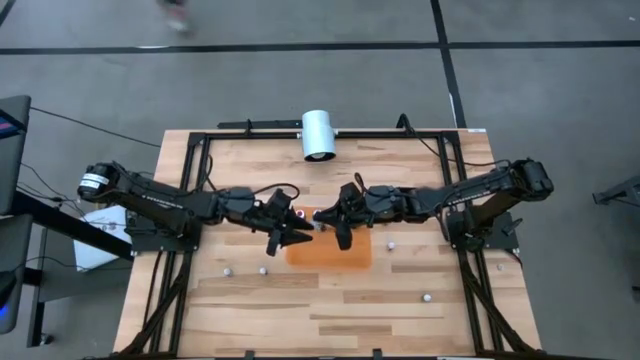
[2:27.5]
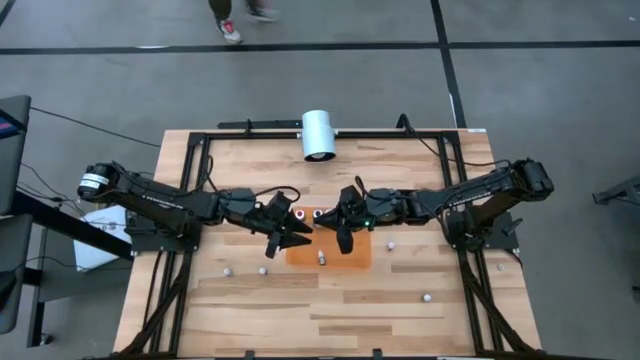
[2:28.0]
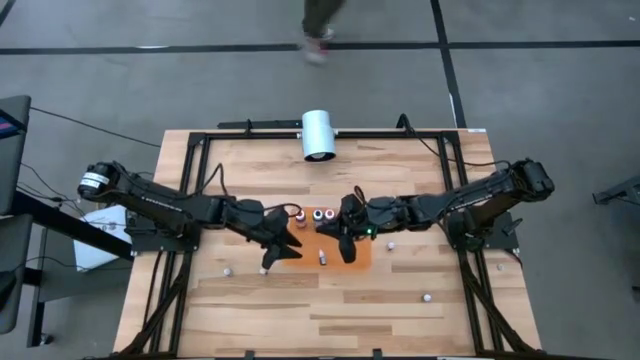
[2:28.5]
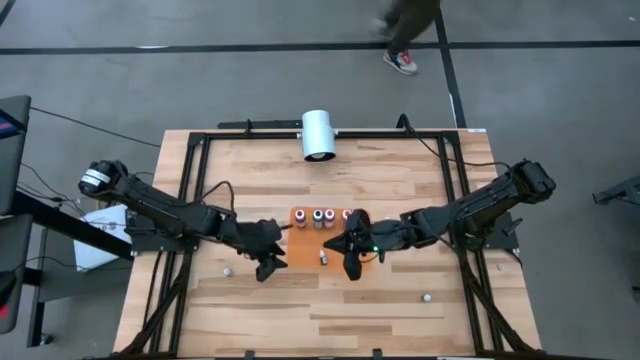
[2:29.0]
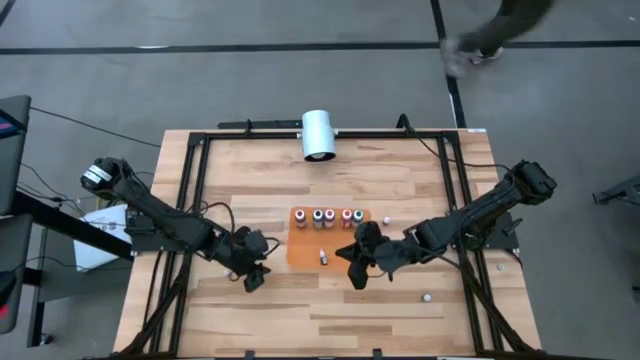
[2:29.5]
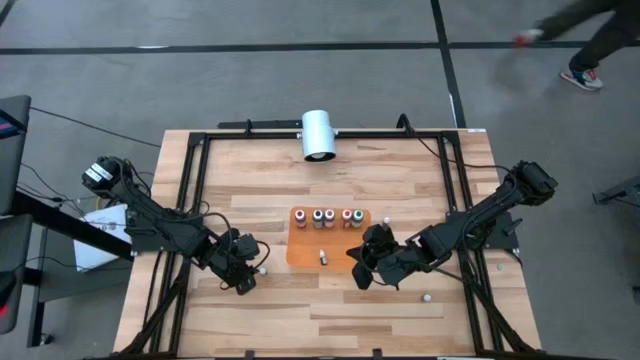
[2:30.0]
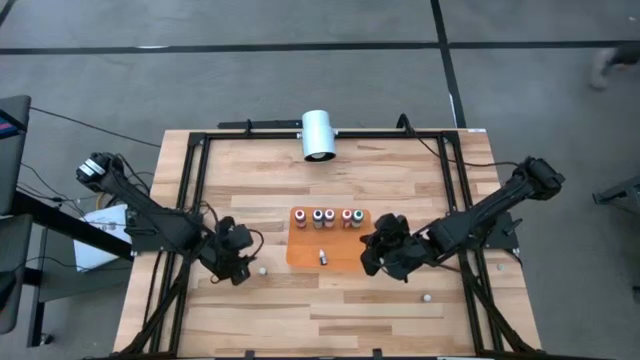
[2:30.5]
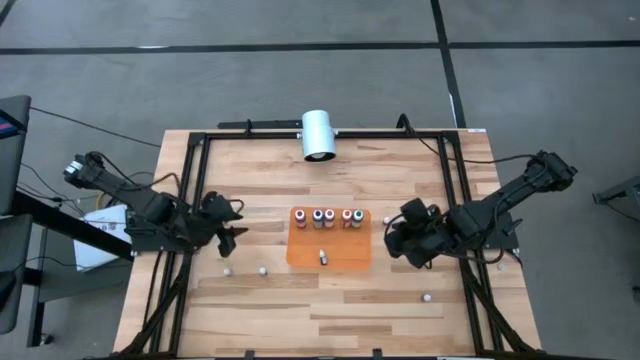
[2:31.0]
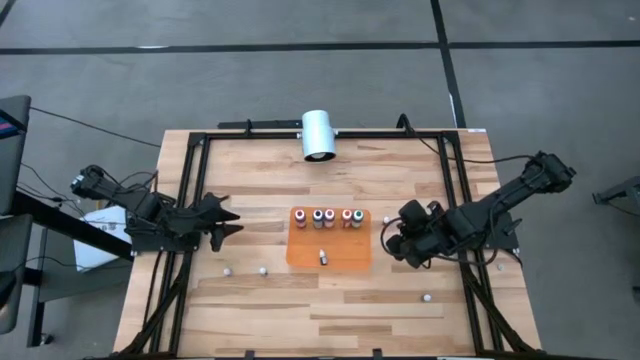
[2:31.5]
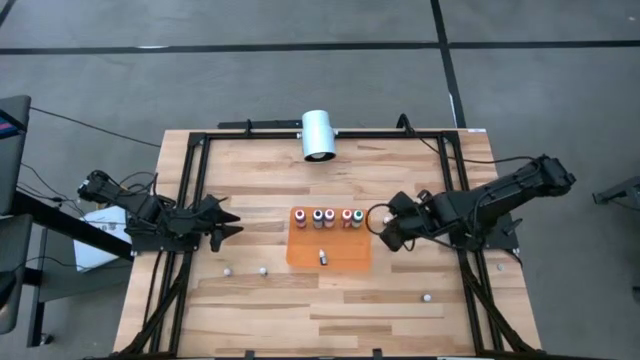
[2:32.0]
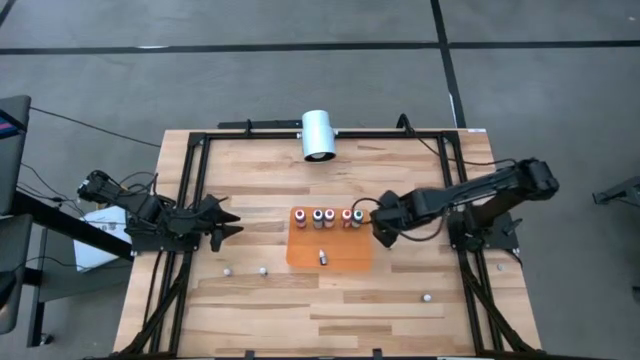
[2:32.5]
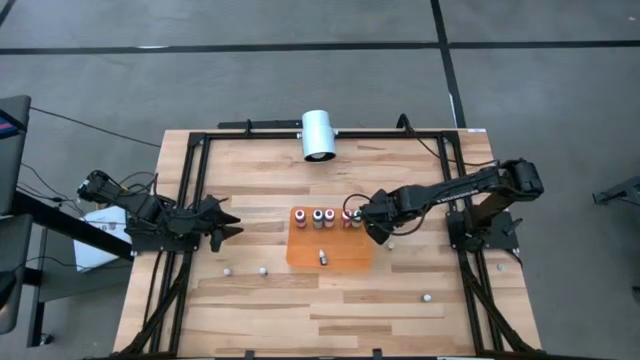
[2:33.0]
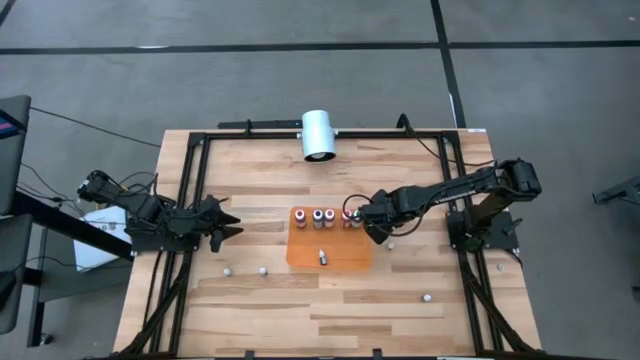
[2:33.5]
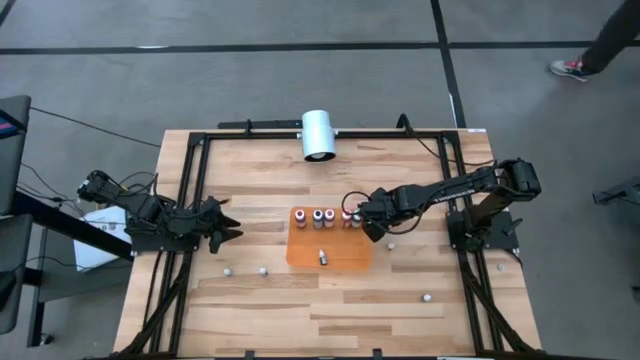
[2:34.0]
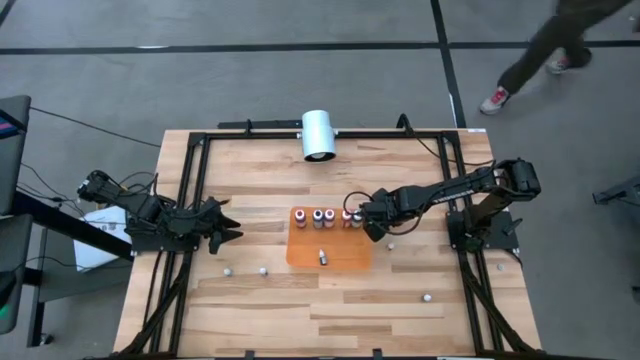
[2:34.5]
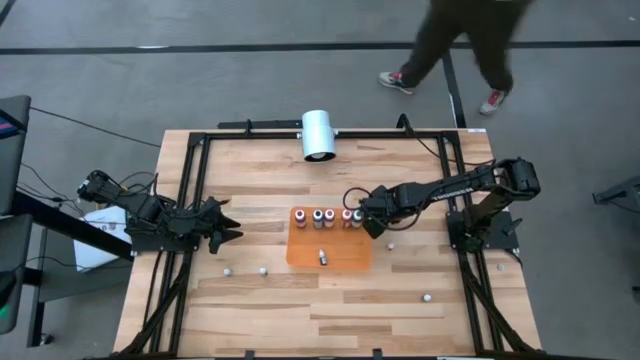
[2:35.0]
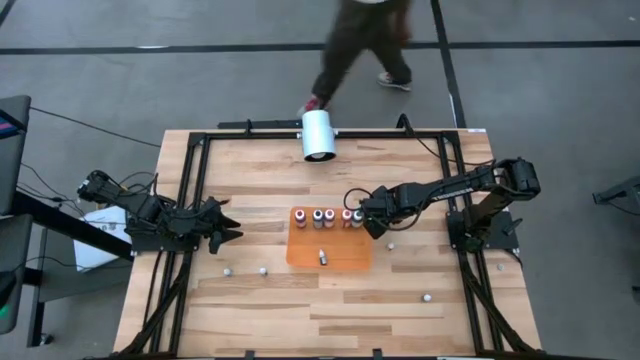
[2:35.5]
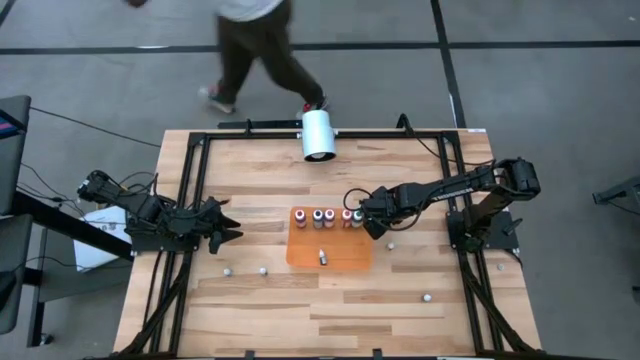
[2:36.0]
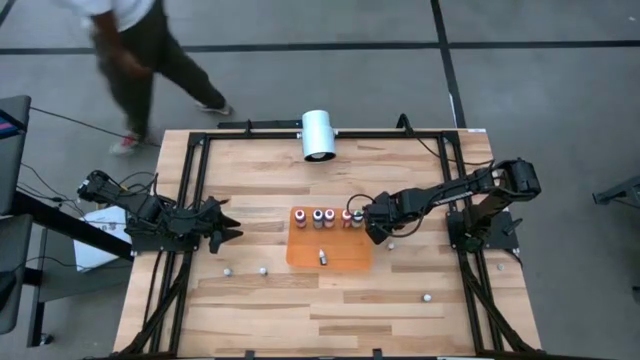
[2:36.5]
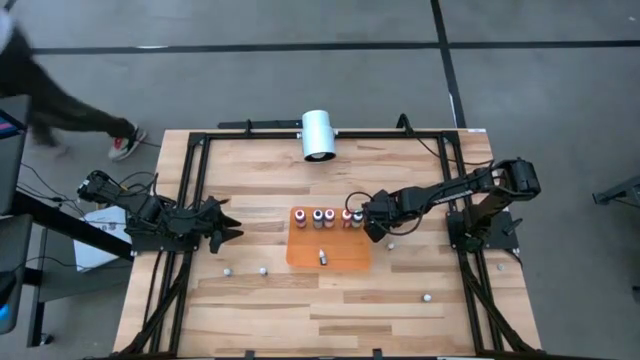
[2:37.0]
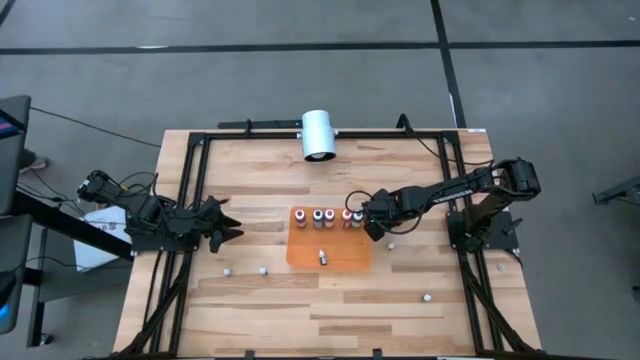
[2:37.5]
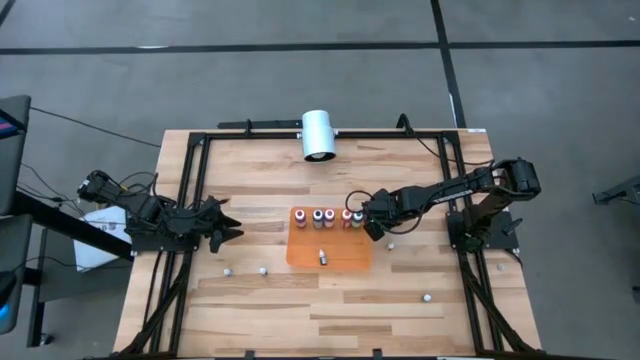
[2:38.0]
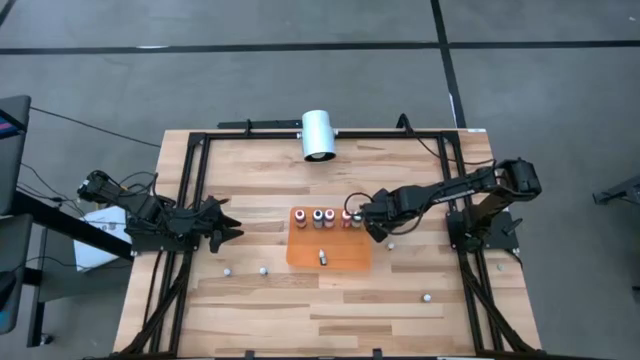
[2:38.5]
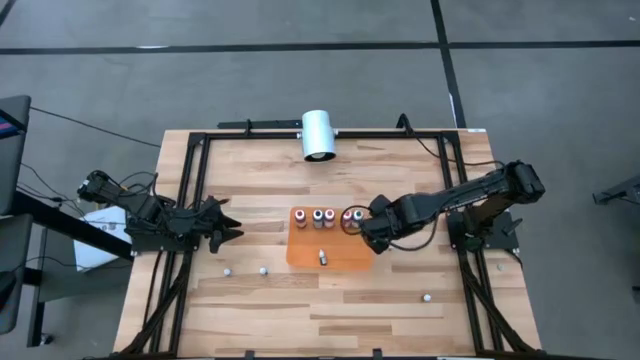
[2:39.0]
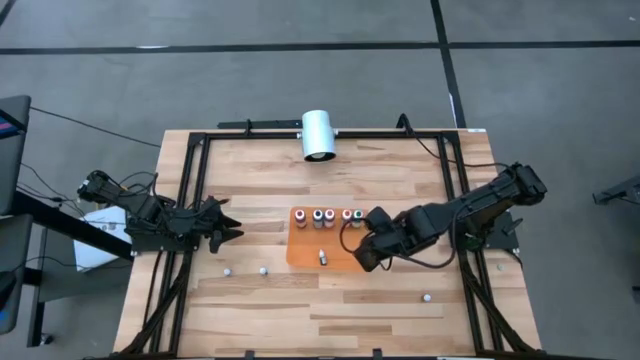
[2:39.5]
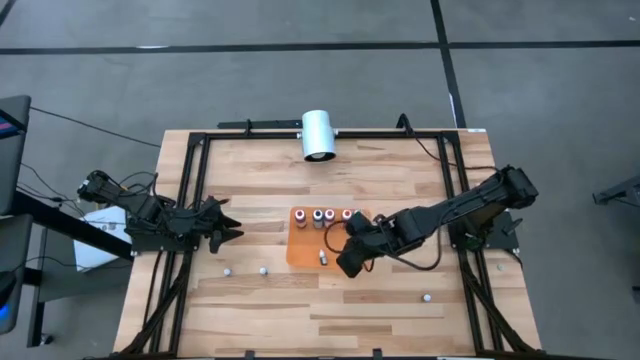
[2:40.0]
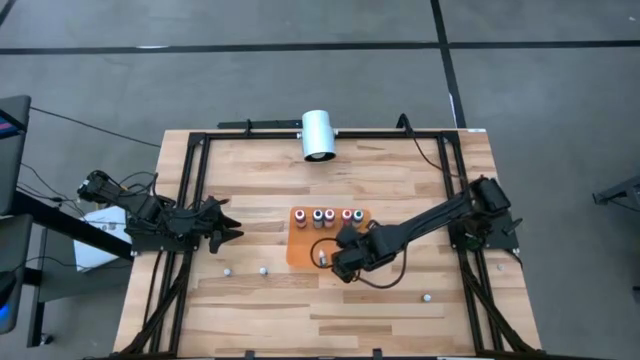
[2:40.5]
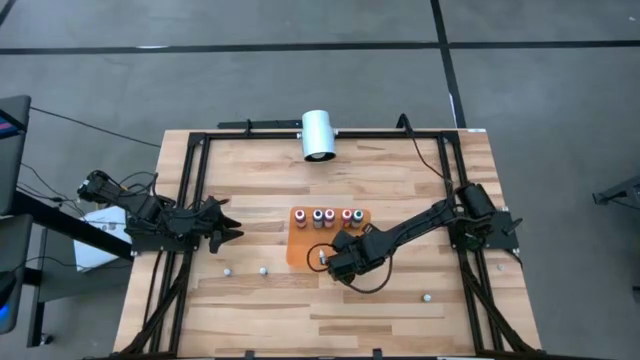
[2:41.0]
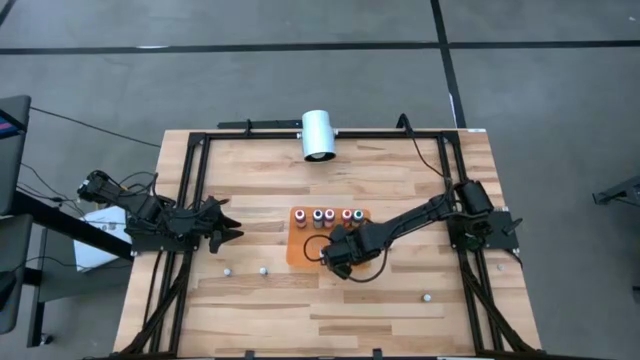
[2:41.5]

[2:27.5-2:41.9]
Task: Pick & Place food coloring
Put the small brown food coloring into the orange bin

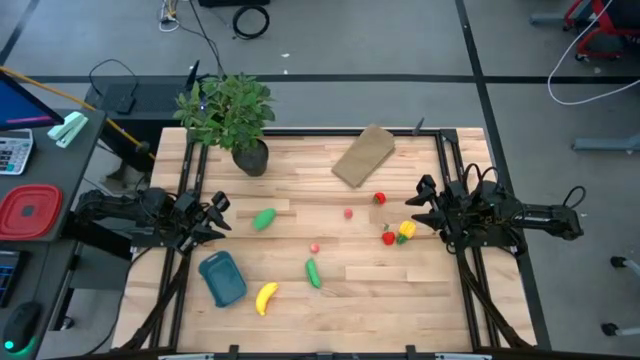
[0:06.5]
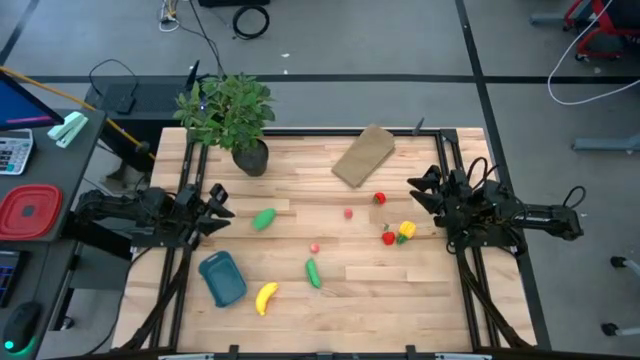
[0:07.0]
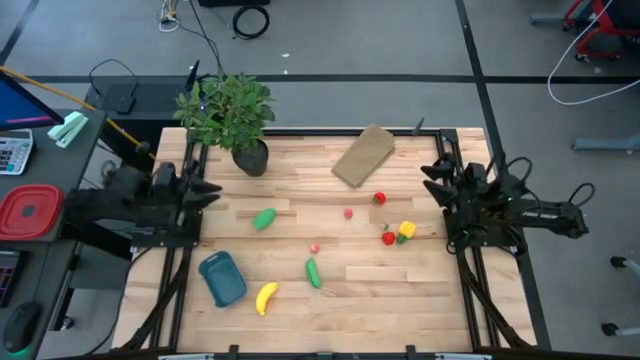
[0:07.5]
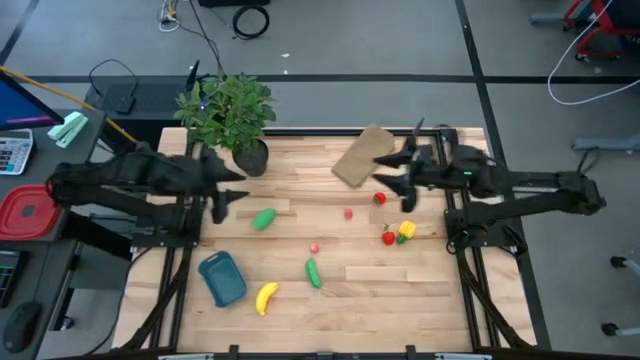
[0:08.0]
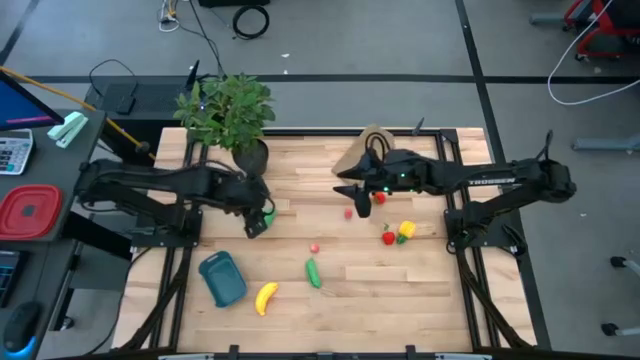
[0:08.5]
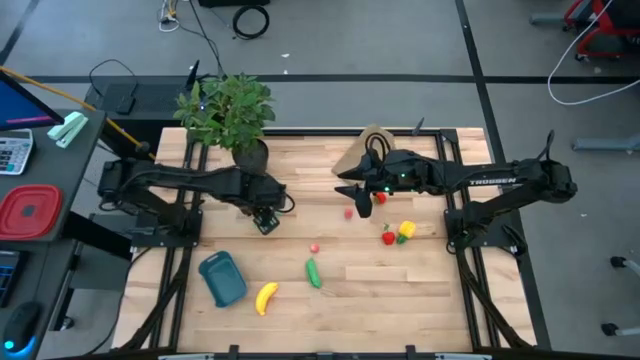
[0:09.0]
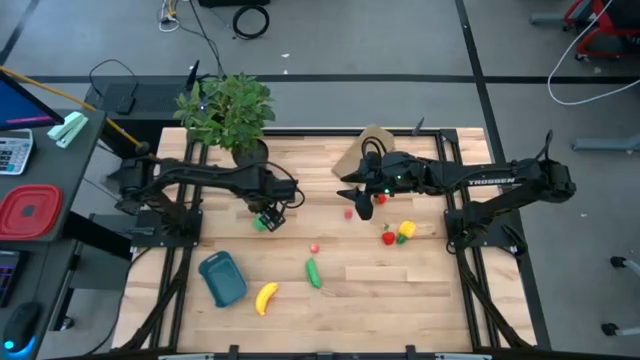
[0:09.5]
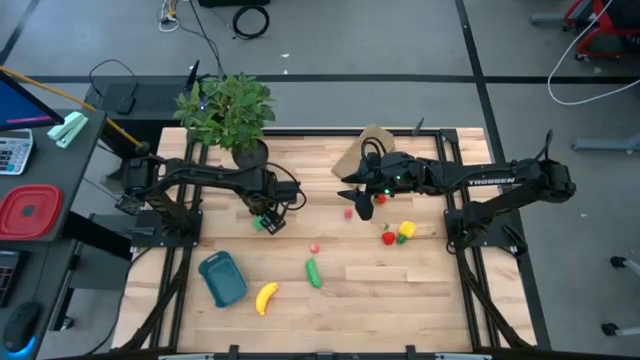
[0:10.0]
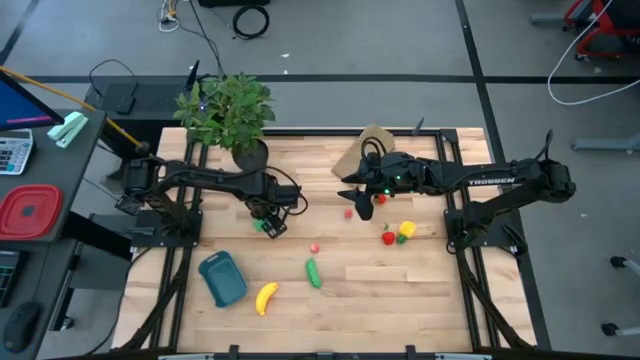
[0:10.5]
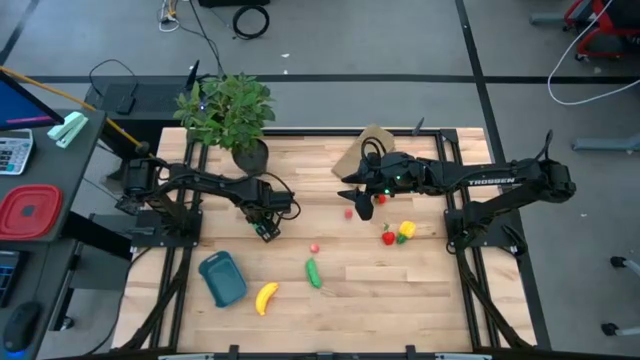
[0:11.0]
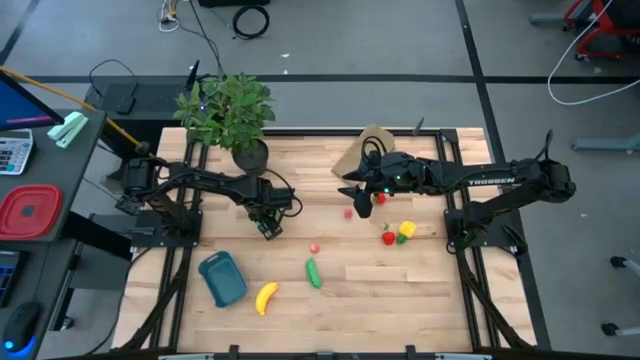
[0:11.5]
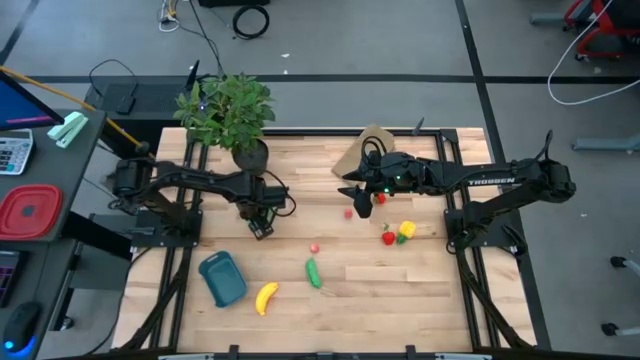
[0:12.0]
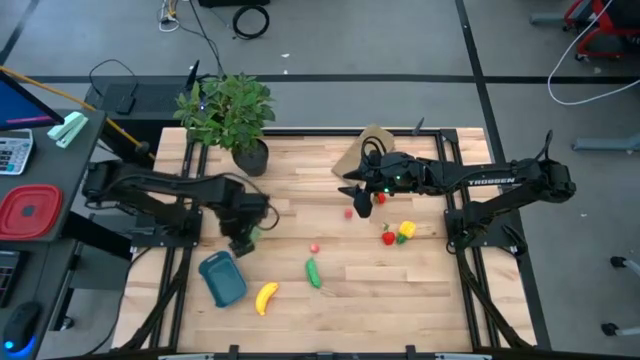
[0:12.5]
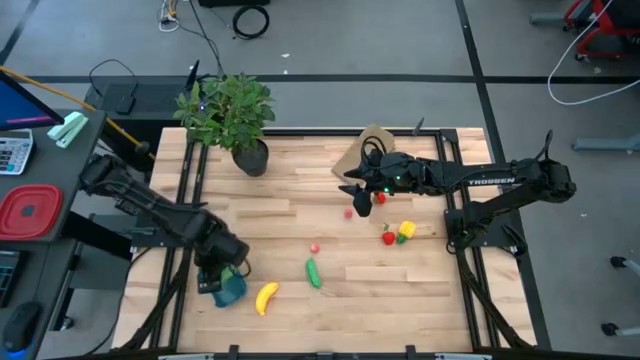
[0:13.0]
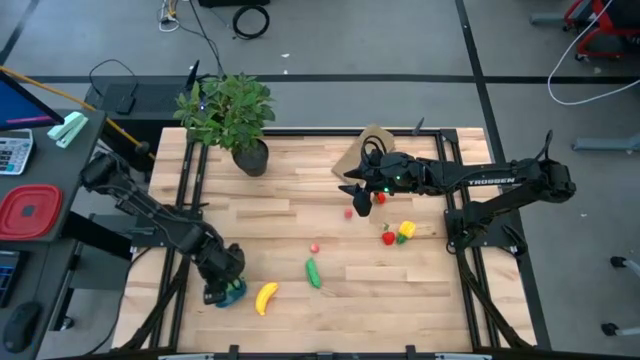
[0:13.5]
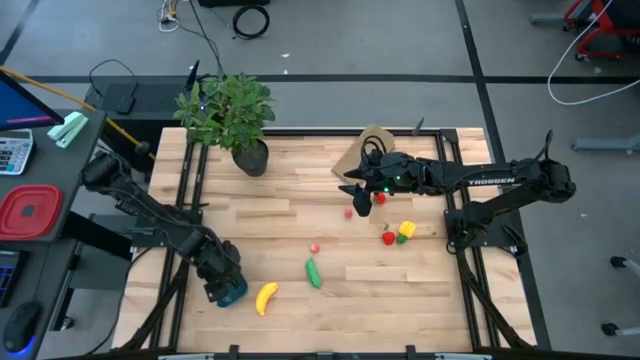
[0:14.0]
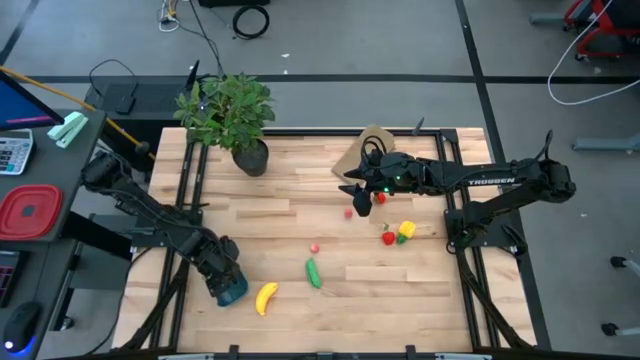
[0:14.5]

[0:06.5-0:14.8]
Task: Pick and placing Produce into tupperware
Put the green corn into the blue bin
